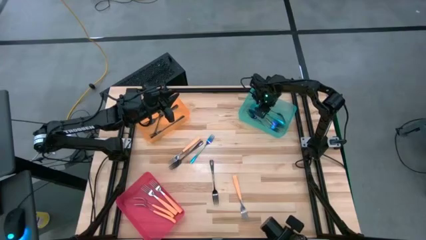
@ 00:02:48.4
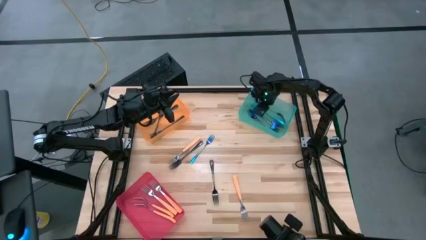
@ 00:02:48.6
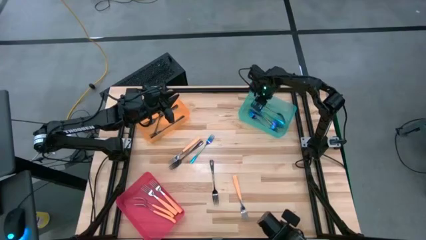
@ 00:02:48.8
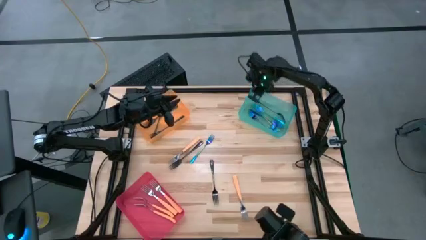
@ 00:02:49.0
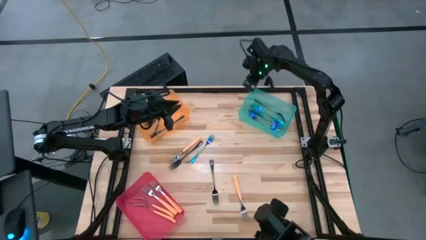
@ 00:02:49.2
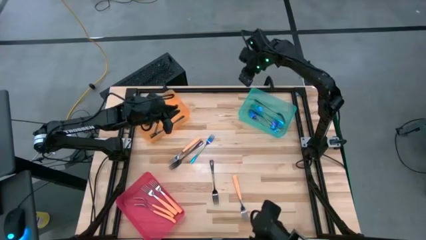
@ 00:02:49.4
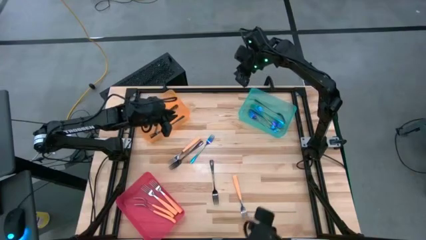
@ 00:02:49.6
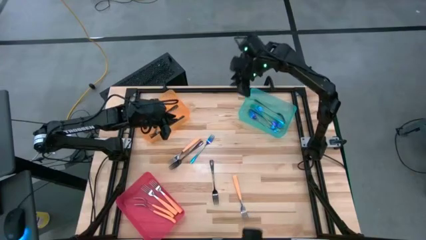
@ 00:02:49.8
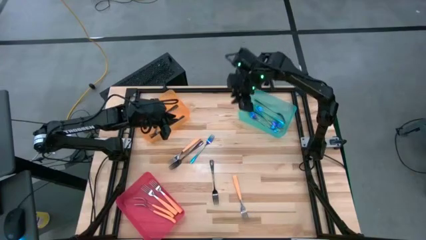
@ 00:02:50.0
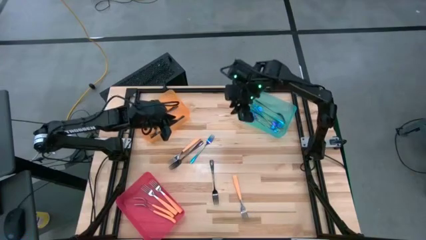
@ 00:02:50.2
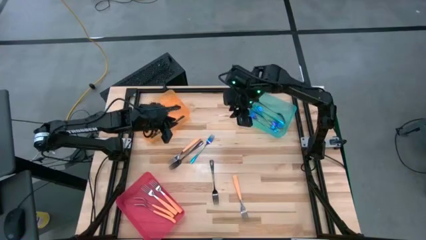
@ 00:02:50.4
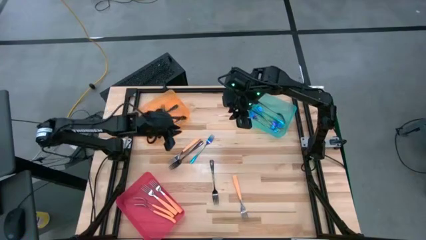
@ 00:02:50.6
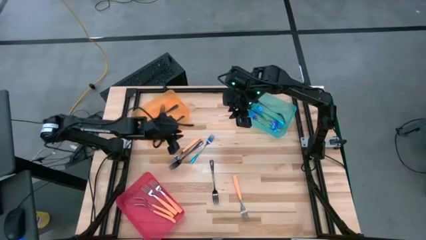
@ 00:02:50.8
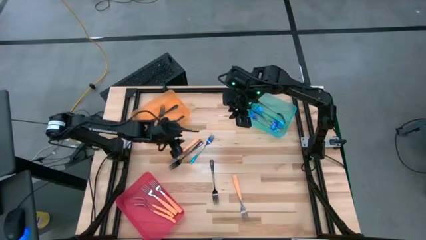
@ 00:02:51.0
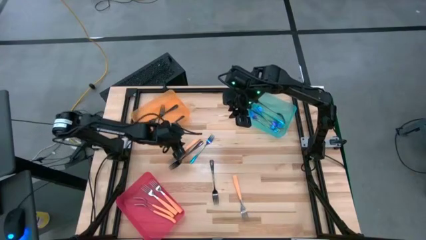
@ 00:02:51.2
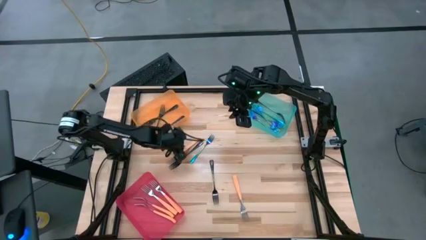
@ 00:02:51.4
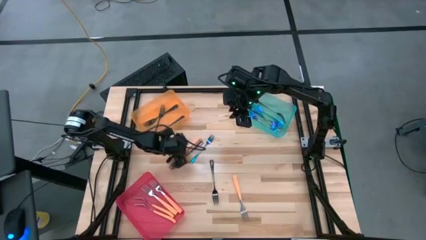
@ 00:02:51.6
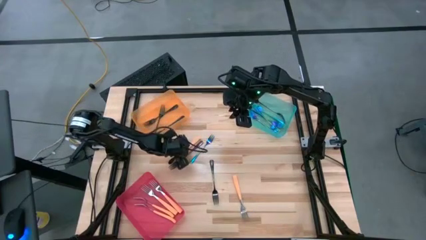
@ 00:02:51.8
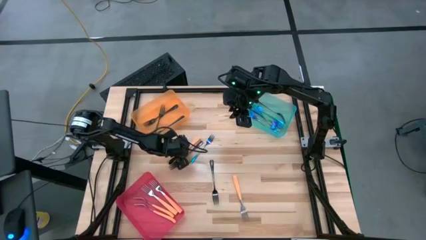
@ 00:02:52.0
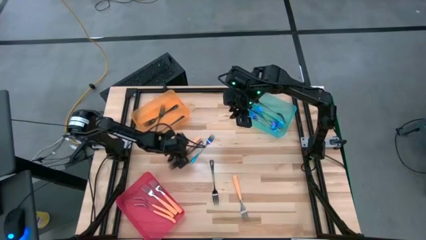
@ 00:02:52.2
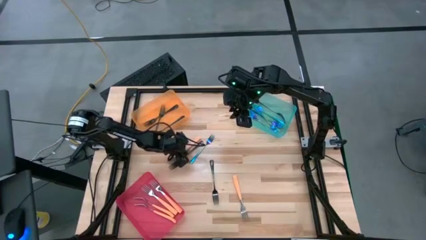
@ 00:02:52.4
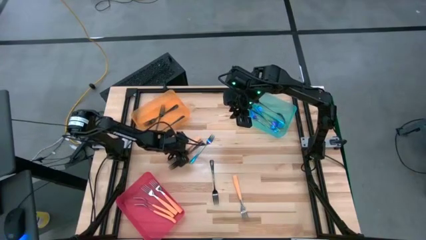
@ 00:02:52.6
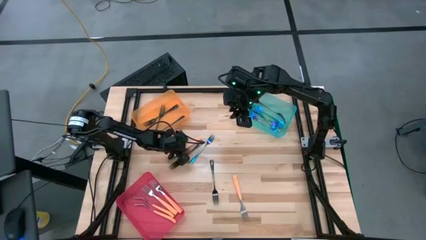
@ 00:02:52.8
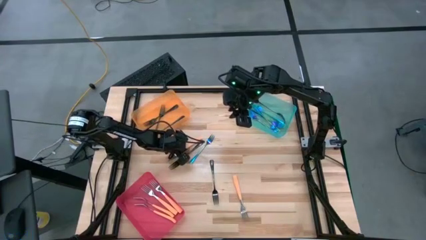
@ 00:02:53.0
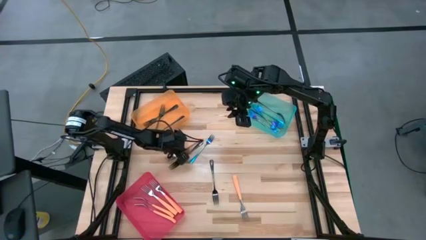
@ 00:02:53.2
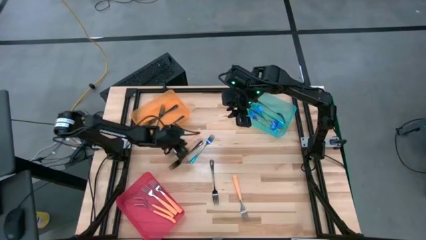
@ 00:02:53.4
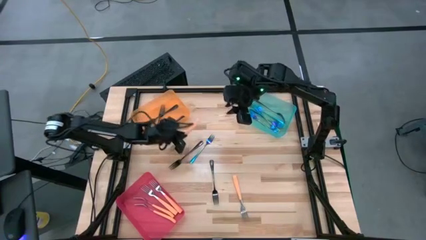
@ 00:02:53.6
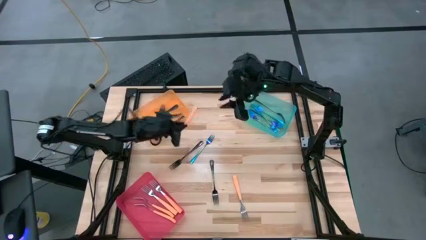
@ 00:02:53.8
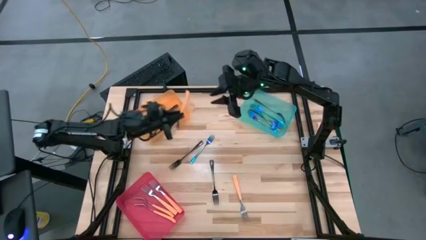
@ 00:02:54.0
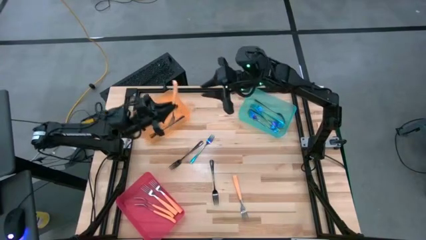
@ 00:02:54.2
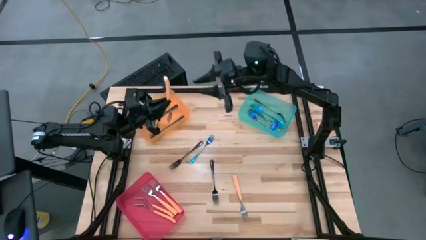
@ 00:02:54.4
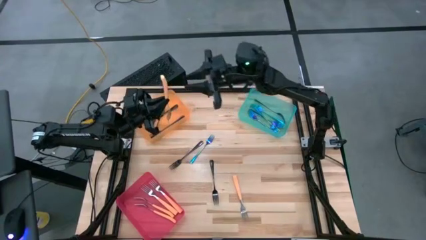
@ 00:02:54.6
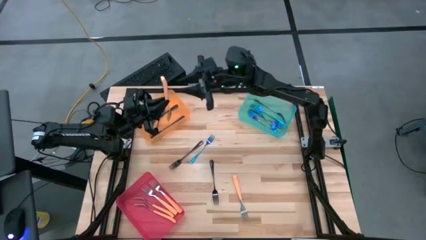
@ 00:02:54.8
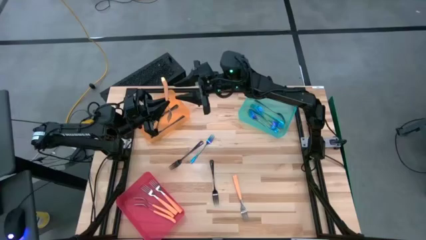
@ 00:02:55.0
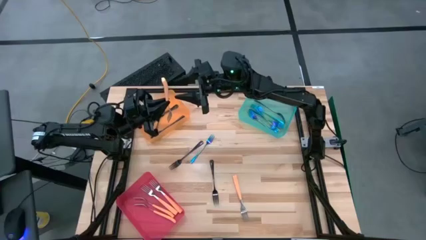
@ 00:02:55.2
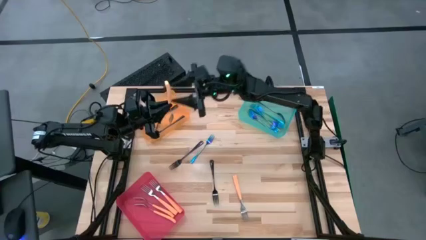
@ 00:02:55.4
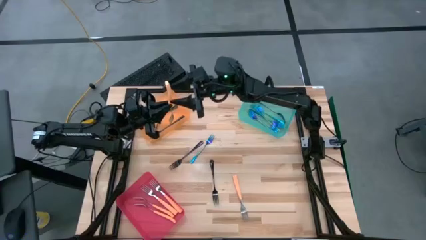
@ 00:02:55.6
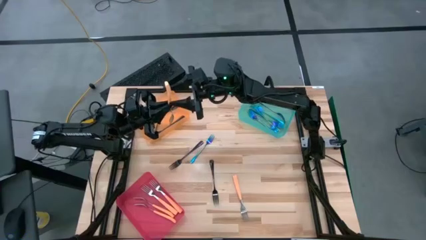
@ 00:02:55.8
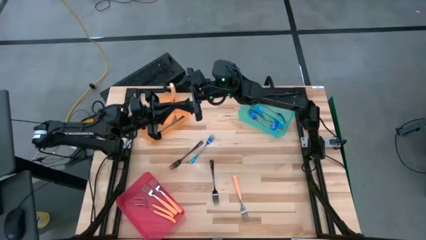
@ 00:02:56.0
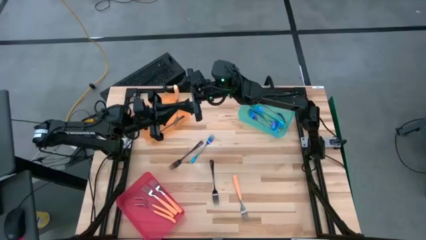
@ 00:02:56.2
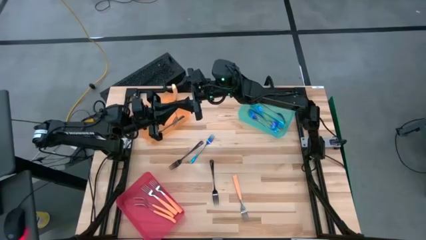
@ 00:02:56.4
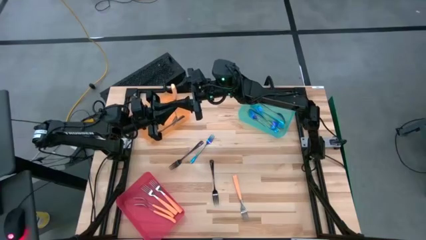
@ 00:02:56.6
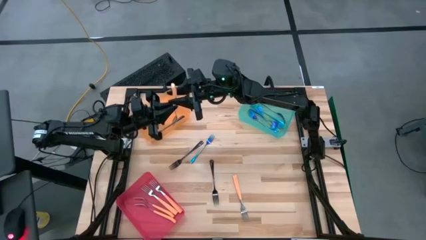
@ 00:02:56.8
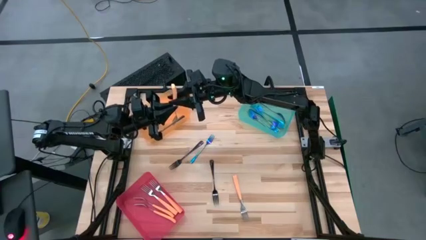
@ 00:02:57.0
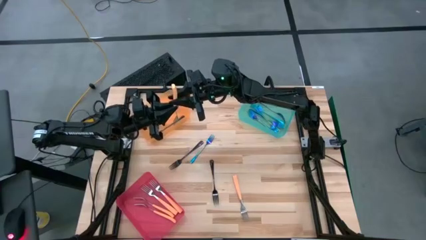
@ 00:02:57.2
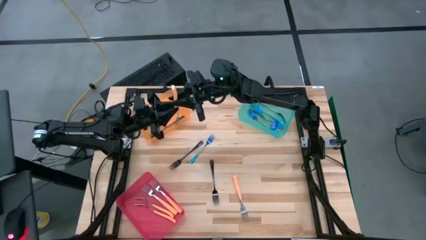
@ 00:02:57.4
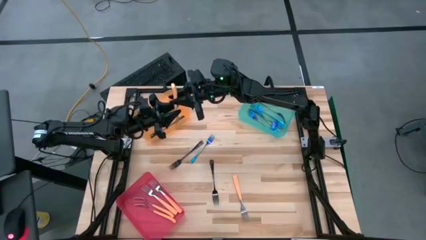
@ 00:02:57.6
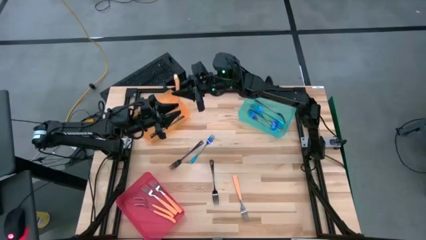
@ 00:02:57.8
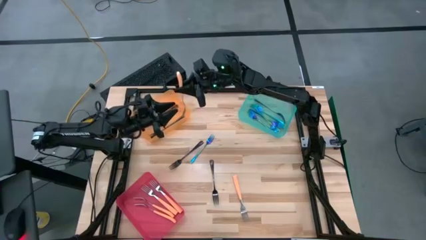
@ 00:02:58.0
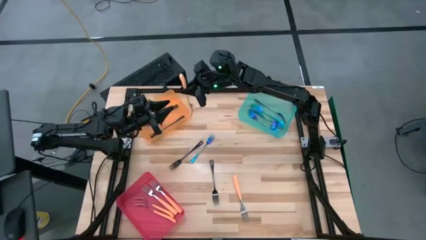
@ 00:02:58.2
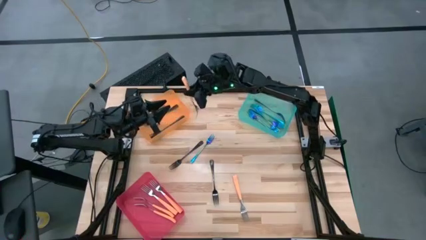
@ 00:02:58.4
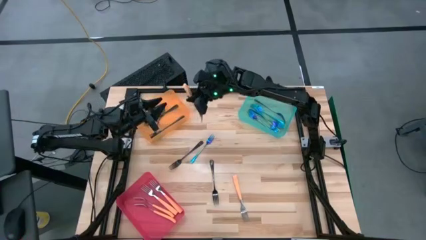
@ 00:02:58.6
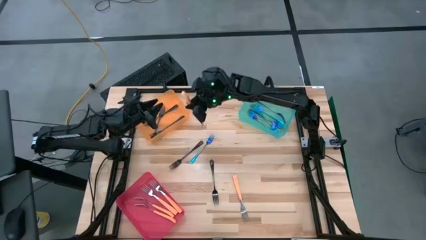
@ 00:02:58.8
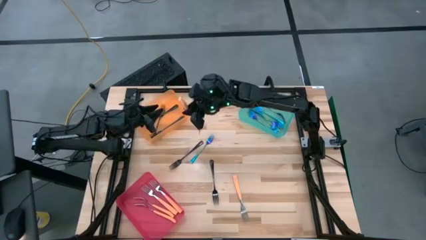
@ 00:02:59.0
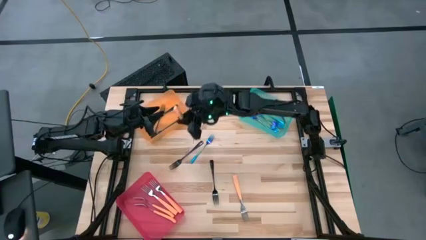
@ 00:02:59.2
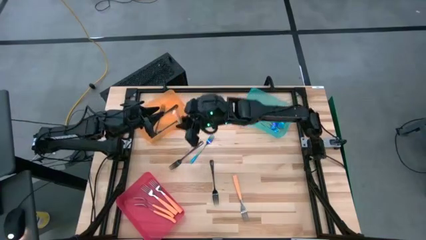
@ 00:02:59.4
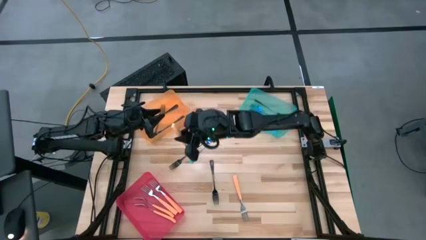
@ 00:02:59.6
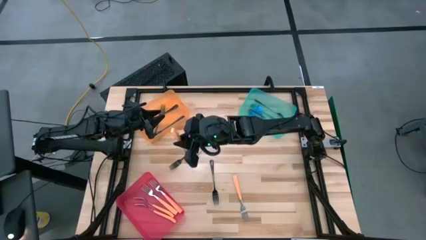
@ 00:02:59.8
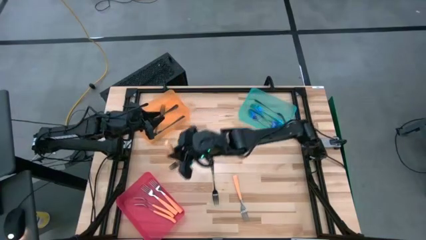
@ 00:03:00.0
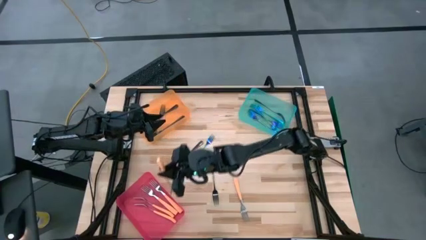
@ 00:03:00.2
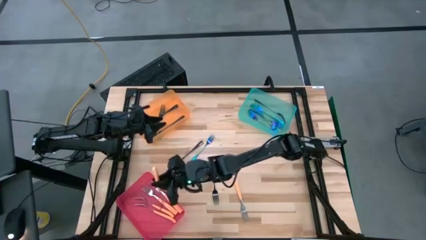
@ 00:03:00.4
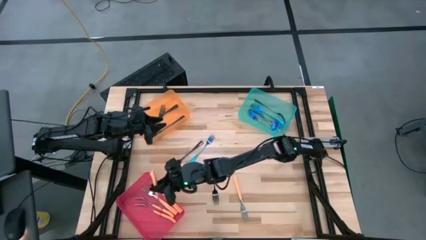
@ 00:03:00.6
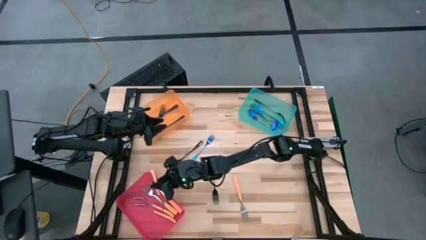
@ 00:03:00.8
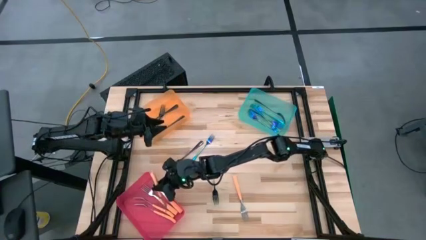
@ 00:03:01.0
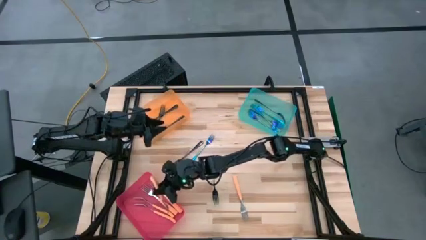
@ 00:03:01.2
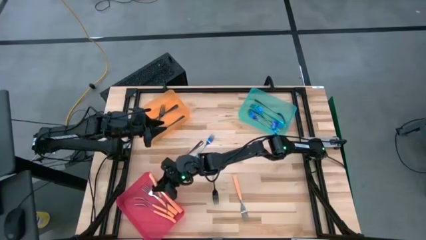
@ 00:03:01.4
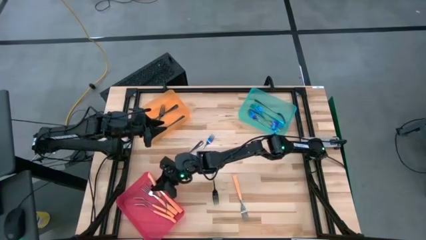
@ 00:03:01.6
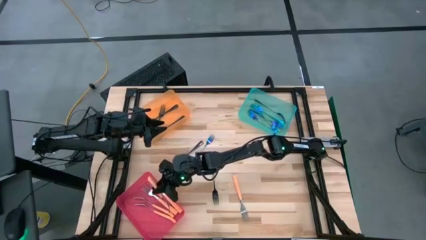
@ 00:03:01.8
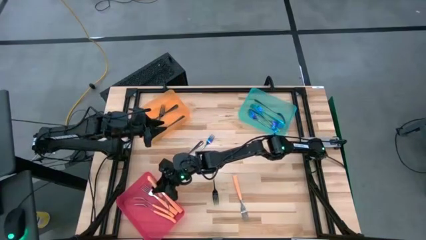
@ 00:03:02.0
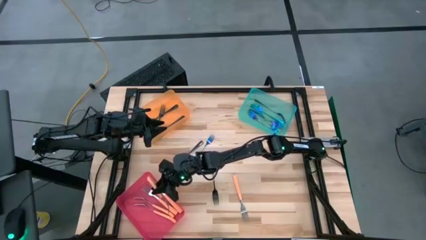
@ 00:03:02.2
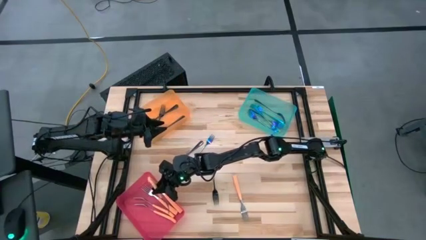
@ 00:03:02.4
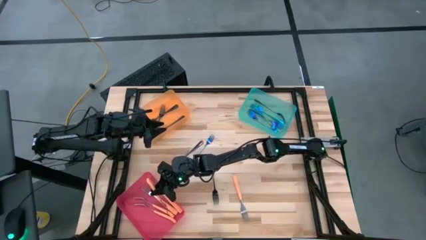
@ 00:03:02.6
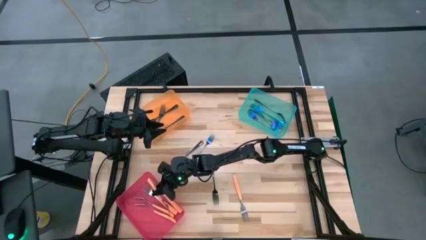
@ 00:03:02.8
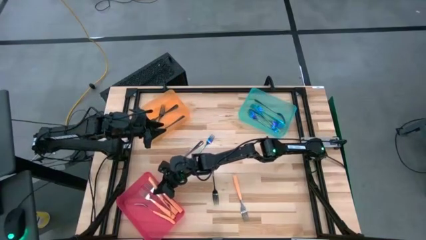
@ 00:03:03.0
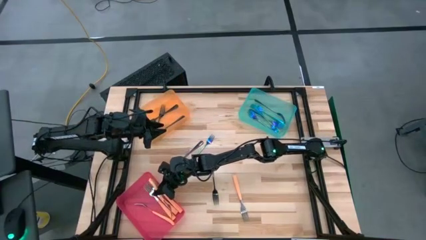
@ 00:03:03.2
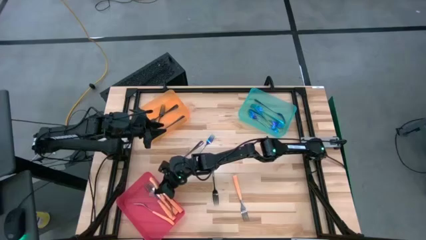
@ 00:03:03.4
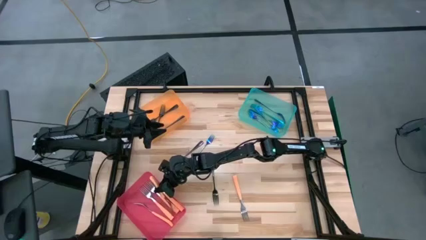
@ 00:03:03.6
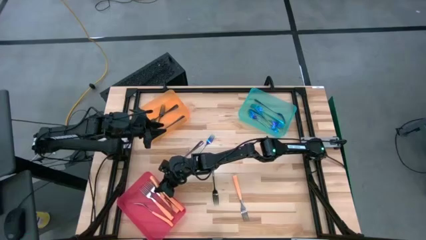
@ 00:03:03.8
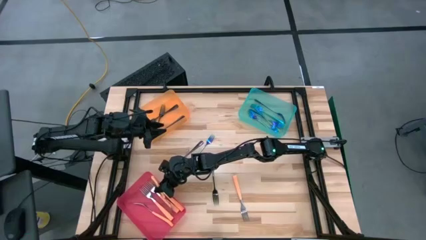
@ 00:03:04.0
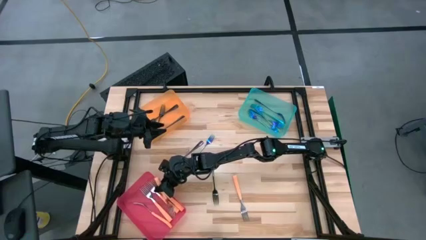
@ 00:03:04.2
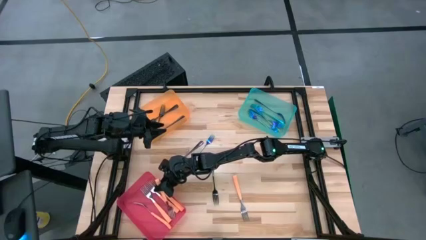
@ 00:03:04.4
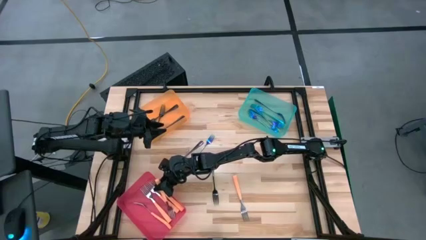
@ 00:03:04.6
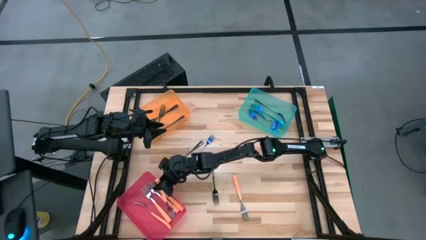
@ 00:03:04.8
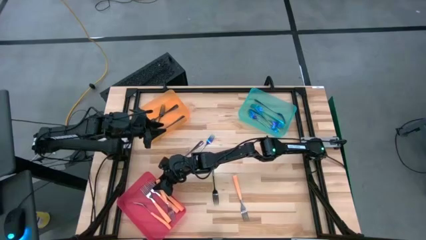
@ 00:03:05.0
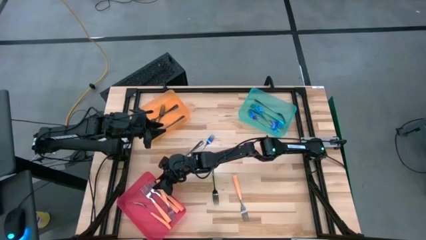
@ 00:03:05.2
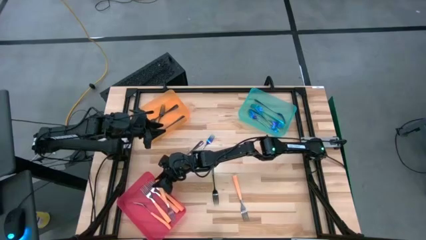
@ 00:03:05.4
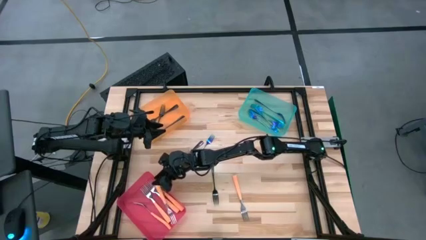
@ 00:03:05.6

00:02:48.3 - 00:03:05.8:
Task: Sort silverware by color (type)
Put the orange fork into the pink bin
